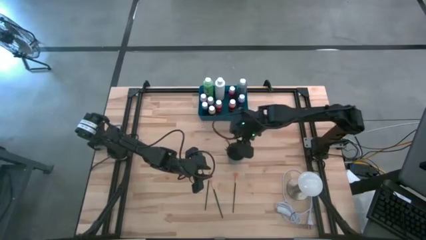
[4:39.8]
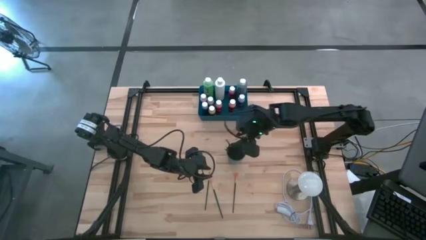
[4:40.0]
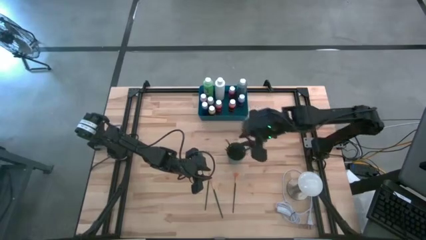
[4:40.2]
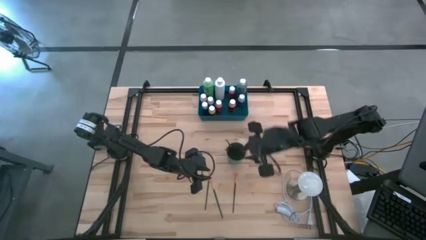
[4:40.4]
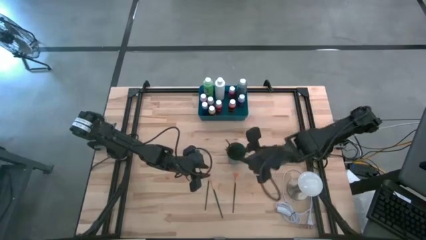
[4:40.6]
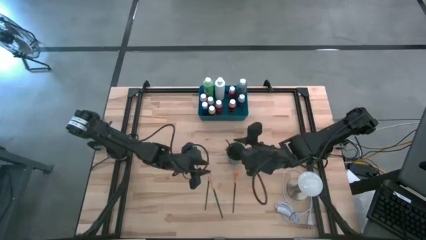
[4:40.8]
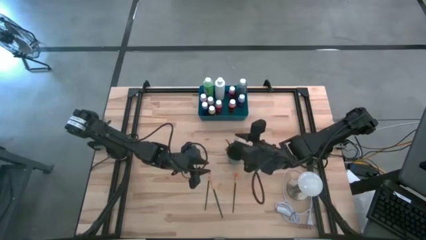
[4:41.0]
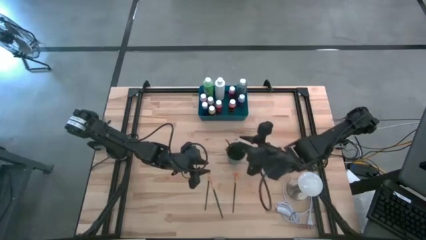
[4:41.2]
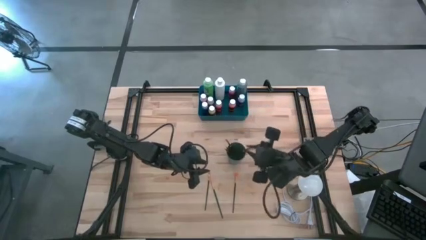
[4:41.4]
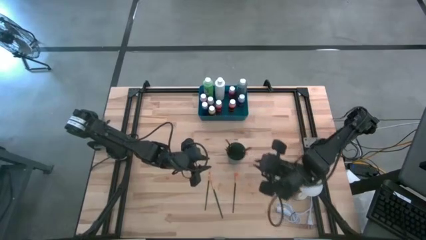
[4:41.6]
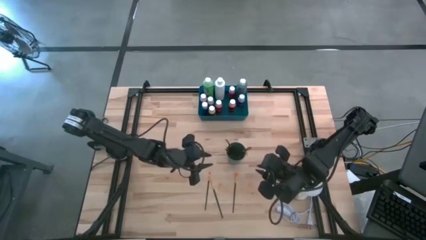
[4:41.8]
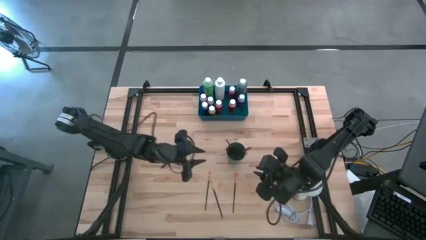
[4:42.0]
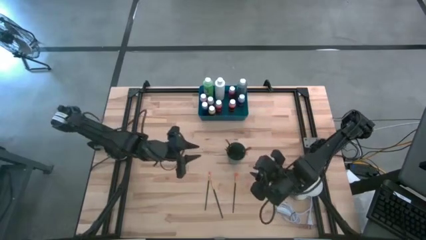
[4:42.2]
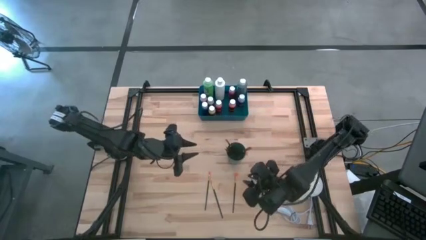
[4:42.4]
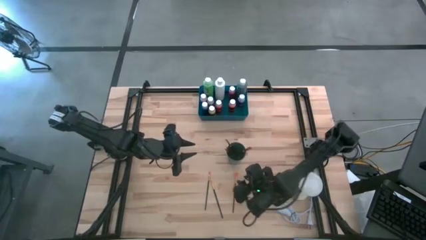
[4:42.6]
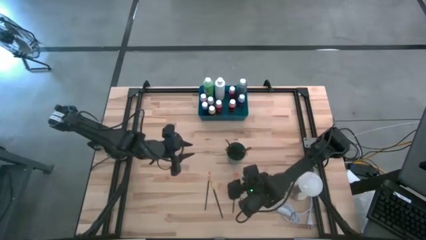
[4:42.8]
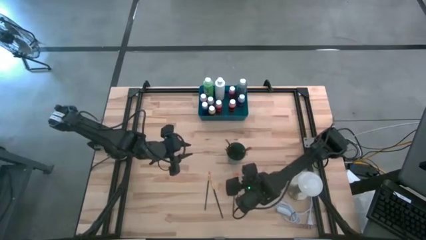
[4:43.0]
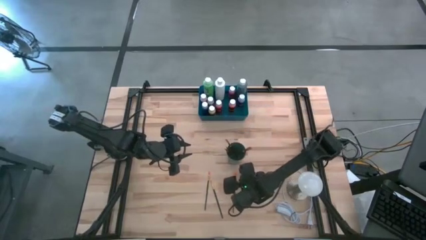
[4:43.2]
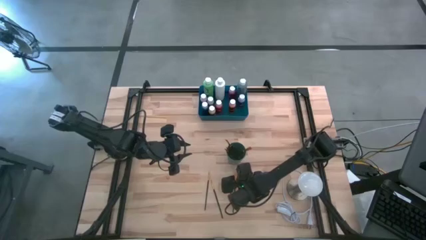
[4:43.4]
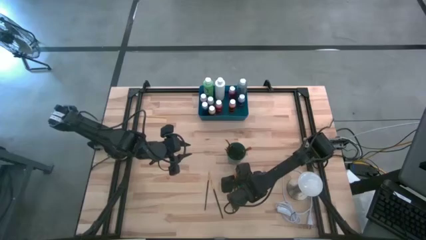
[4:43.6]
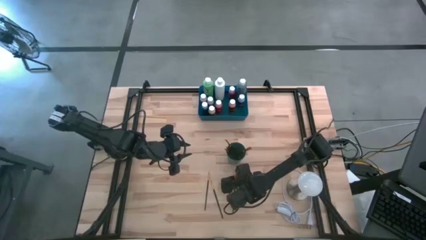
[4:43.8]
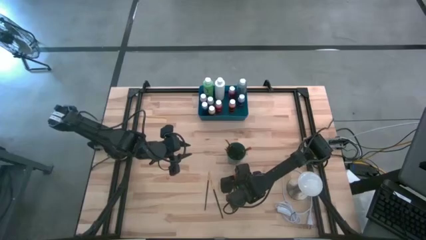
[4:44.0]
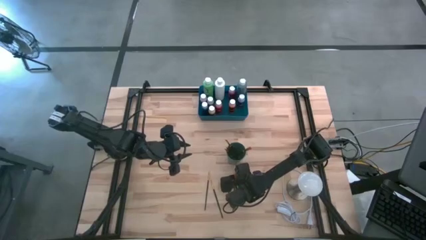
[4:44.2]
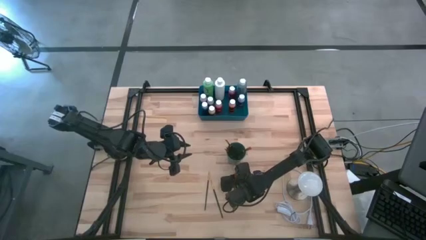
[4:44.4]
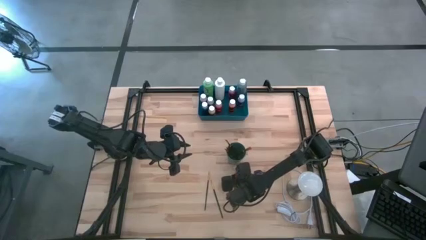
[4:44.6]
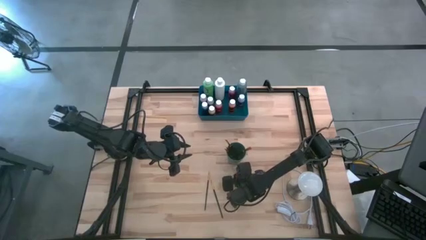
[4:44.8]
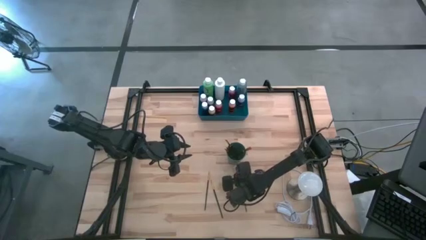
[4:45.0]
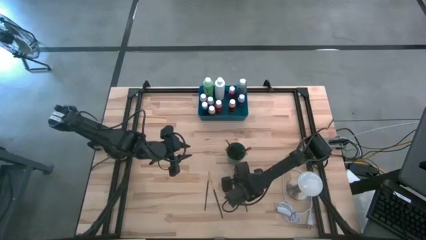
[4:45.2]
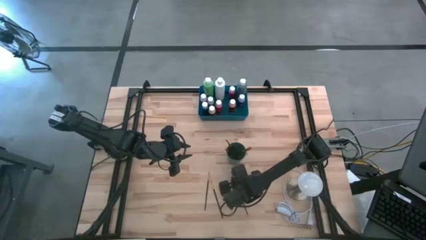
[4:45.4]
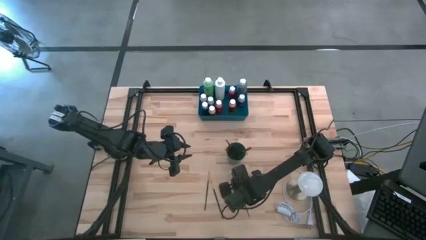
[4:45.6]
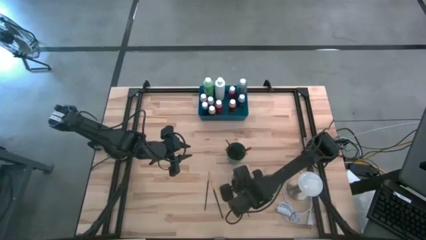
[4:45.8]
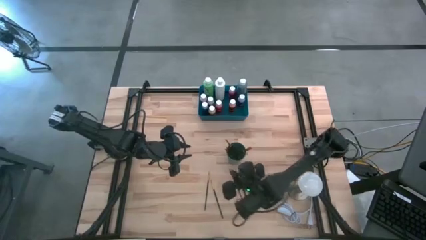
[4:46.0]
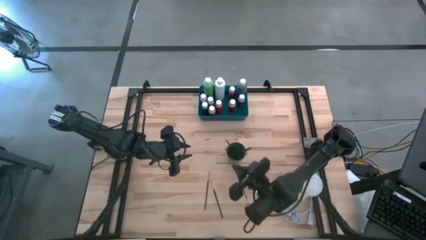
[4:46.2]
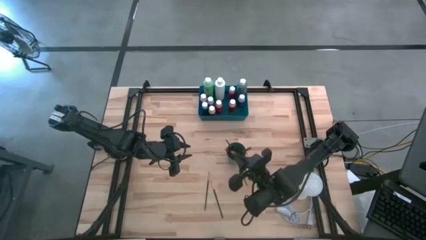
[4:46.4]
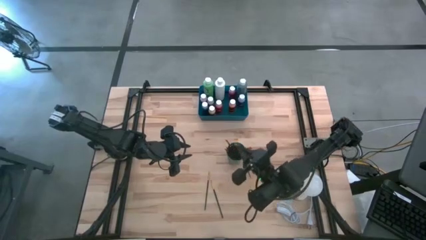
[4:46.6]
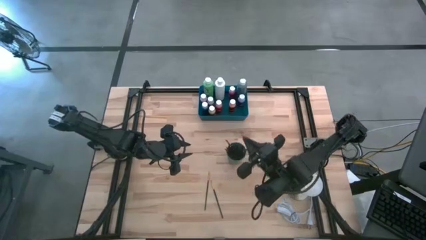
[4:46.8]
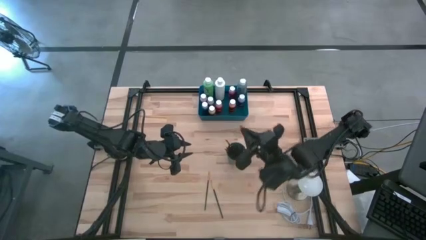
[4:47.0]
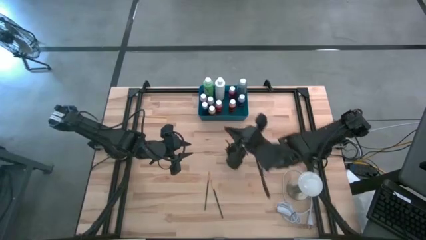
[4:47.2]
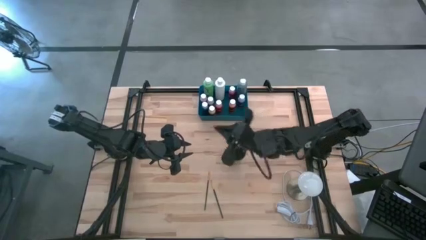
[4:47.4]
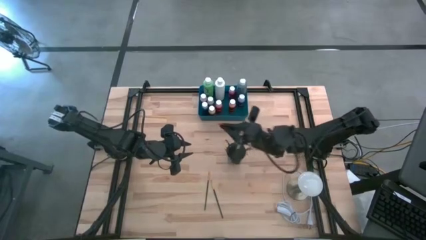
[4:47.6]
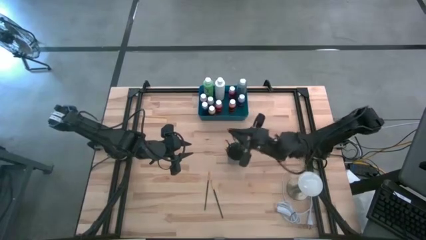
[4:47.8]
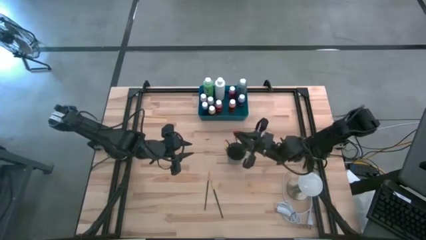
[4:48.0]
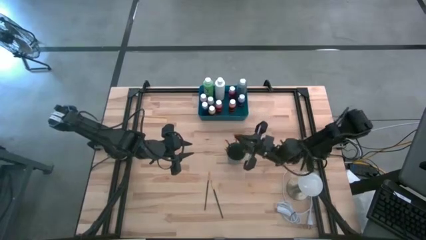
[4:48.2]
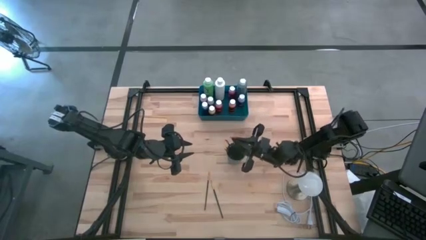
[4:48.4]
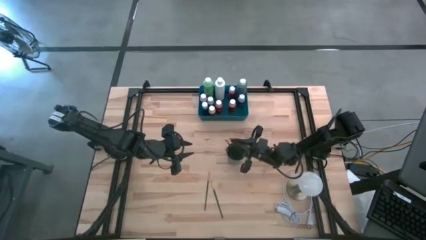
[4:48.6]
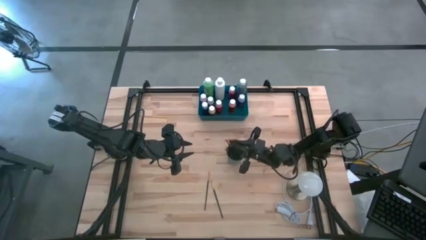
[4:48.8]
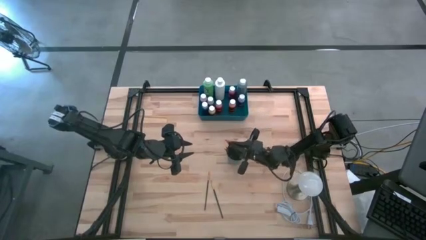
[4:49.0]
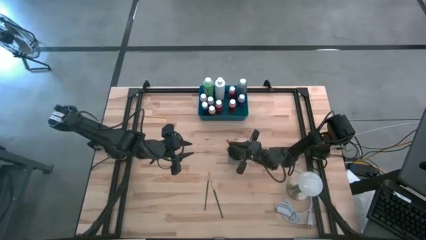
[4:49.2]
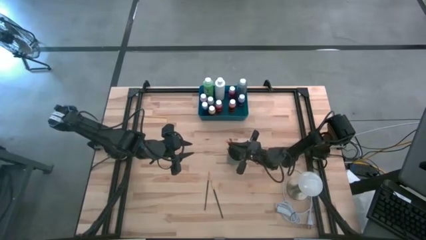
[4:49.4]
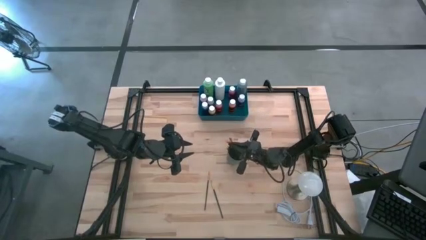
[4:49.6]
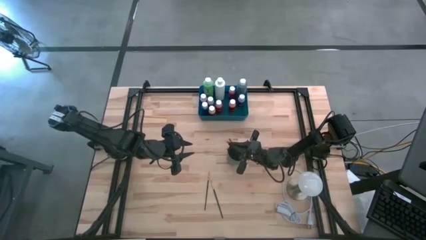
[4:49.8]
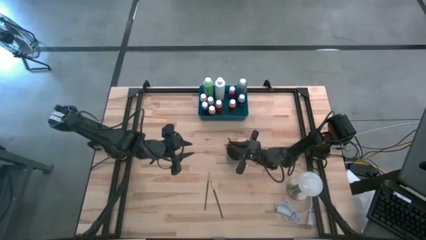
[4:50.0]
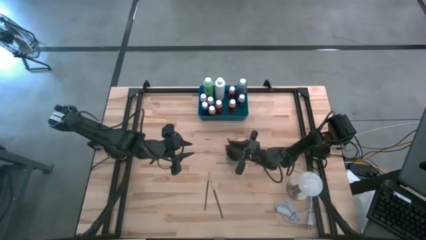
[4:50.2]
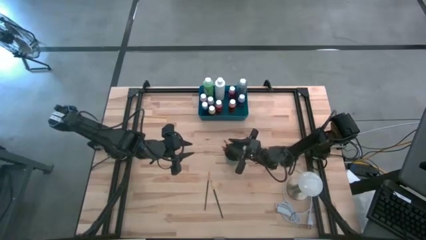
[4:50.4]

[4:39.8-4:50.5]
Task: Pick & Place Paint Supplies
Put the yellow paint brush into the green cup

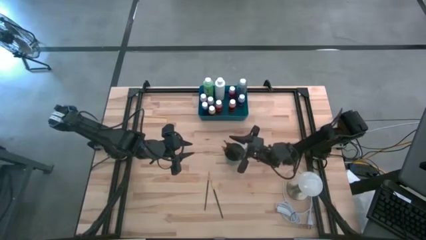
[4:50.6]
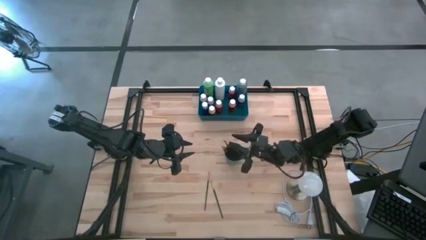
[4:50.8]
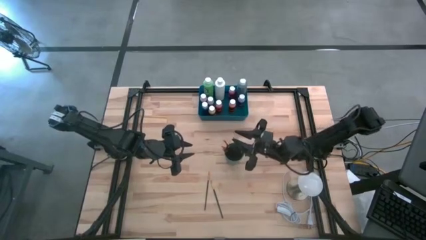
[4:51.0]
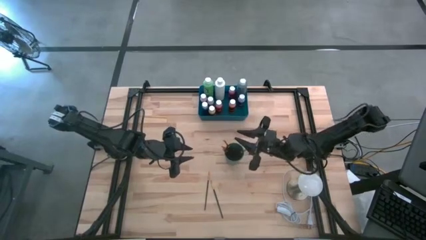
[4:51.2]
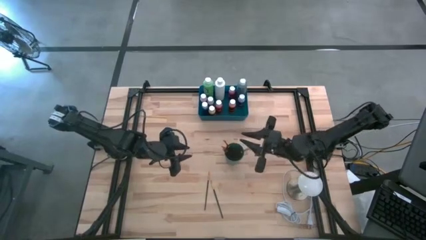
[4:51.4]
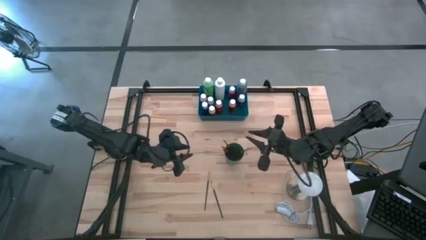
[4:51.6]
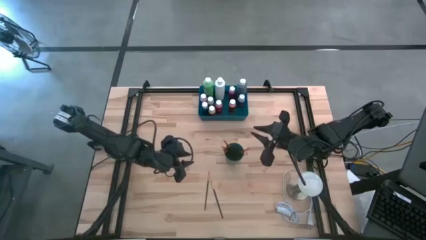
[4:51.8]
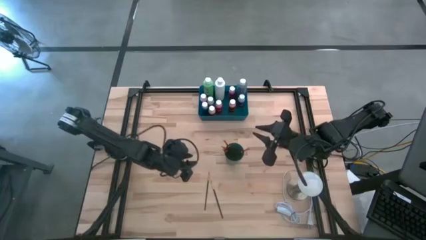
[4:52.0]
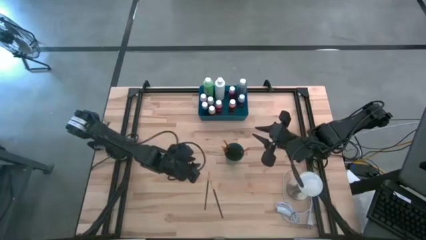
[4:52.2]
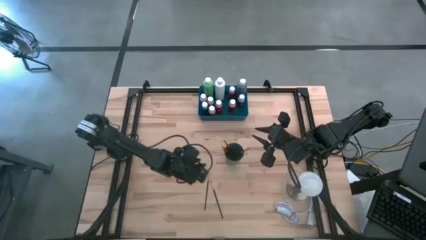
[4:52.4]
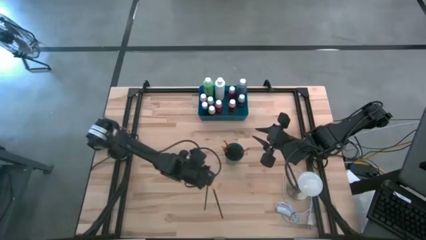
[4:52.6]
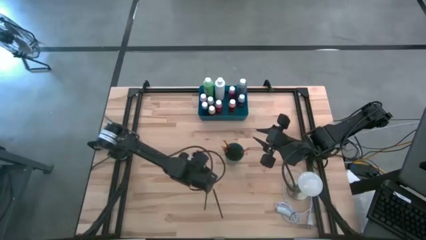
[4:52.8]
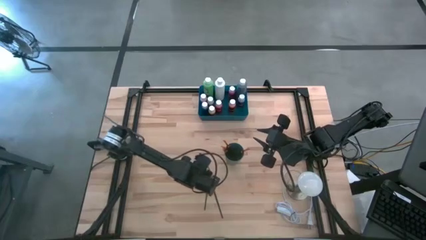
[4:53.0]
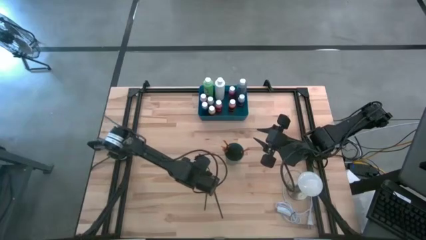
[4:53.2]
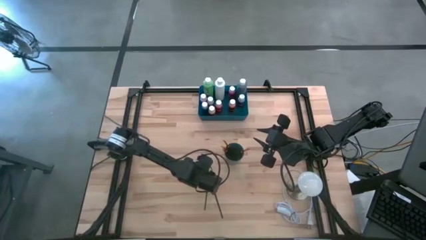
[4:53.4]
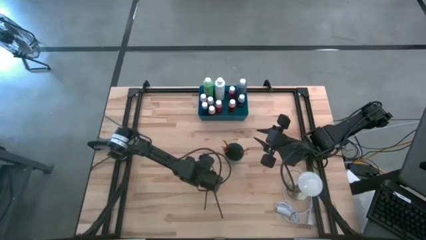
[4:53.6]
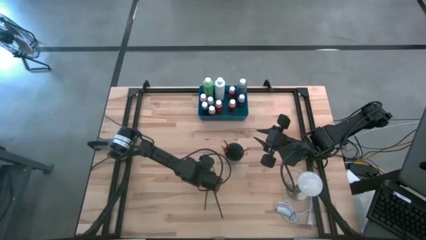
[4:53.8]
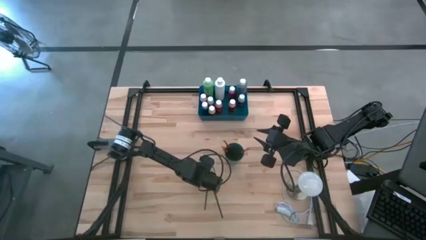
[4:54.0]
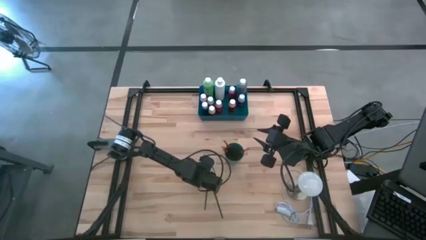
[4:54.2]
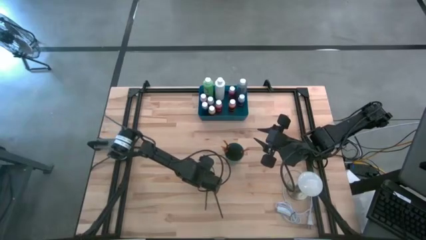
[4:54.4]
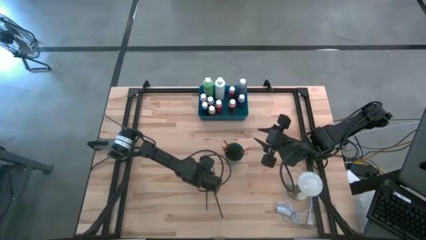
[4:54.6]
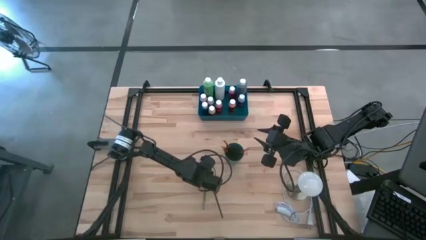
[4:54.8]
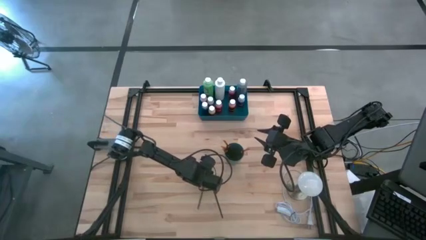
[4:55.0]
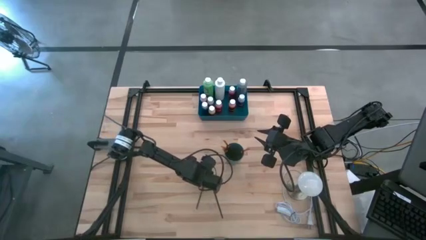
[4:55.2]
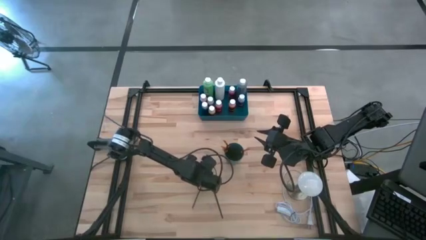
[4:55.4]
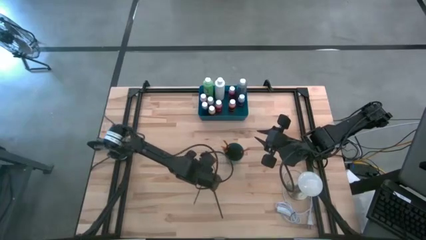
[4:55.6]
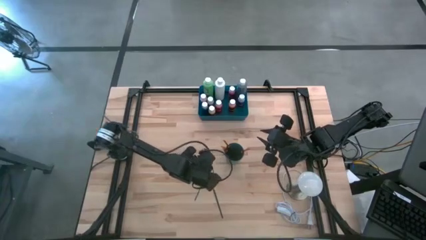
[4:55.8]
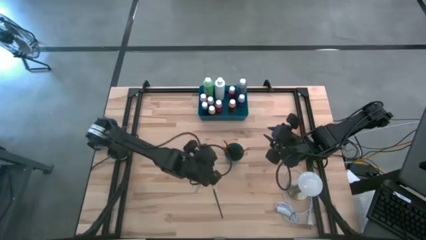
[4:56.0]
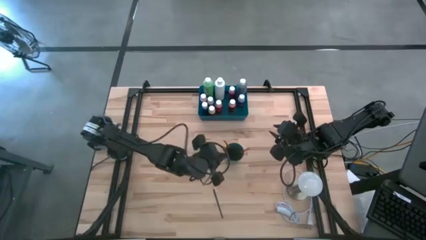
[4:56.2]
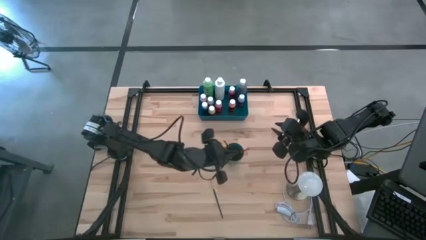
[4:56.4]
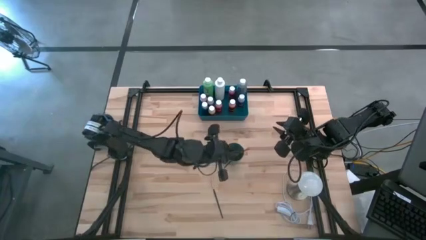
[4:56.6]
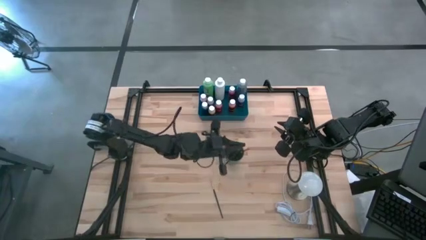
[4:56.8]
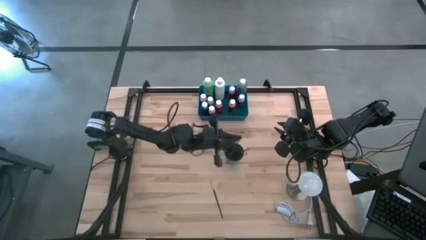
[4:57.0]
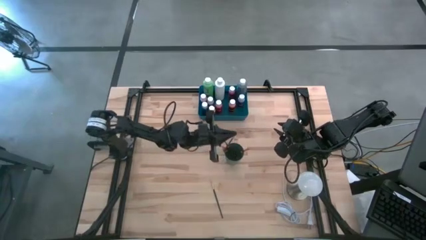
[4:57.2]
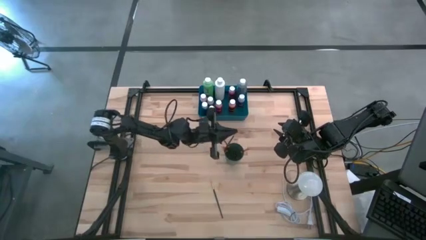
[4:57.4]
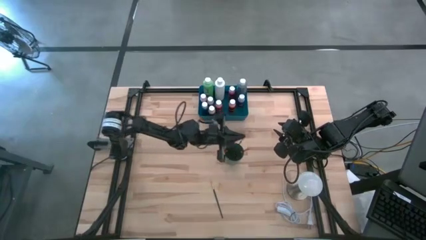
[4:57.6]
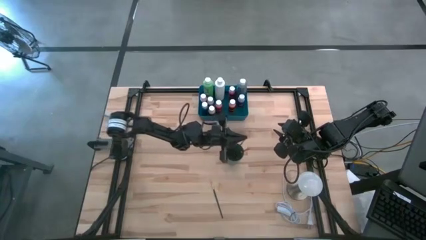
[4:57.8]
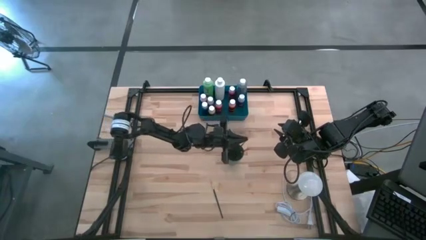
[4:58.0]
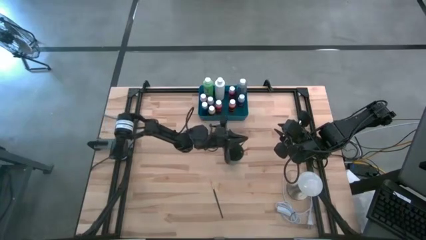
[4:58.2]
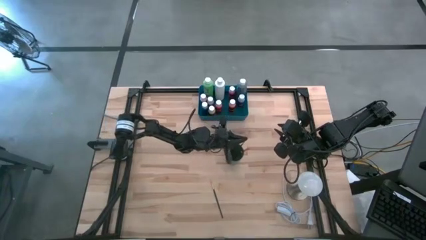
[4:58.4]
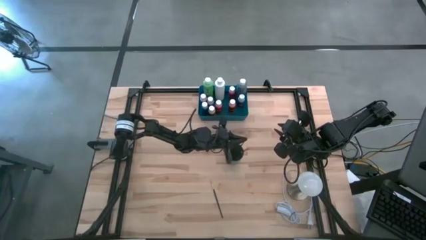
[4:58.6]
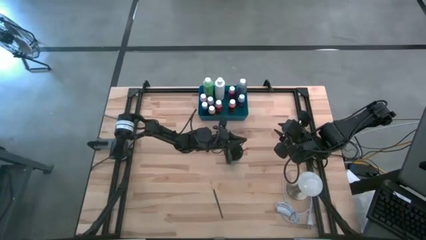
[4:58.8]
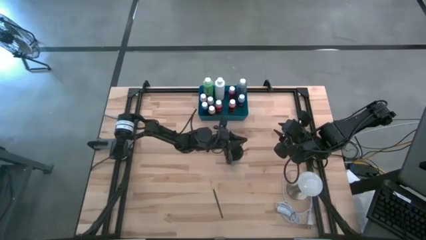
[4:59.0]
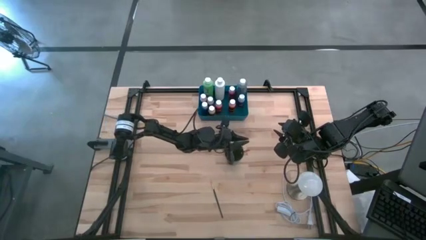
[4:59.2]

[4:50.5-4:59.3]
Put the yellow paint brush into the green cup
